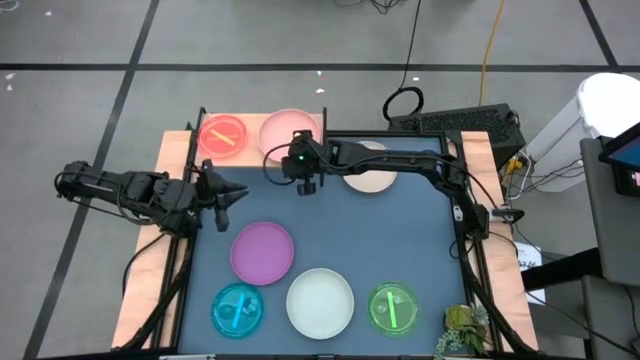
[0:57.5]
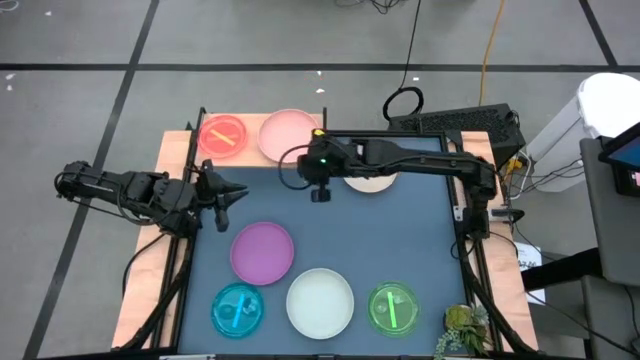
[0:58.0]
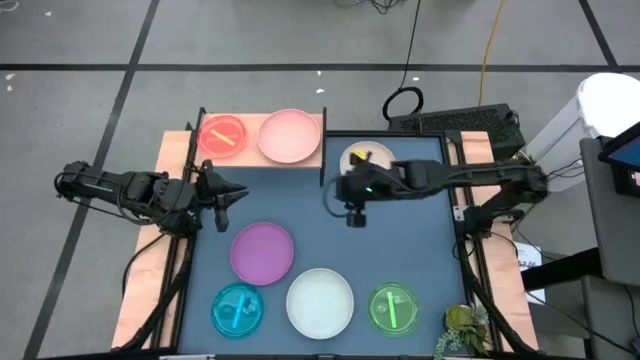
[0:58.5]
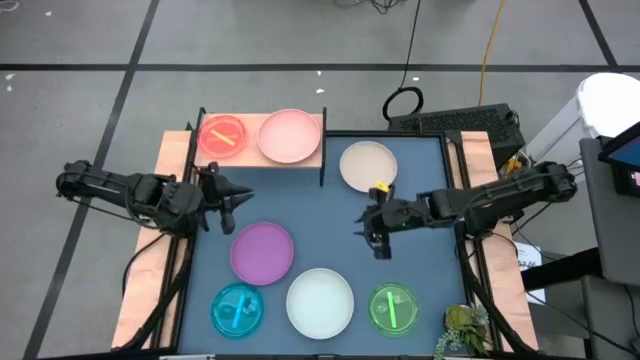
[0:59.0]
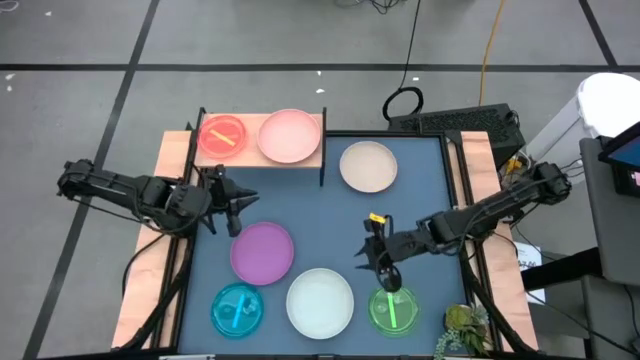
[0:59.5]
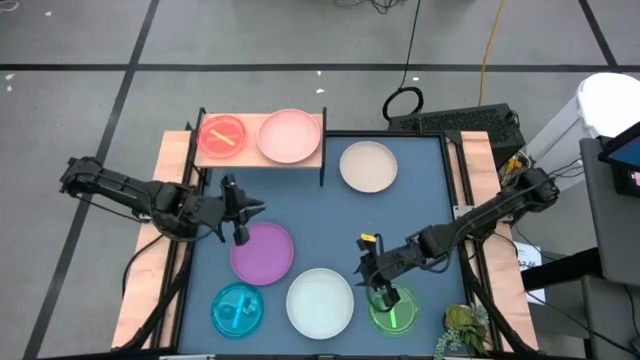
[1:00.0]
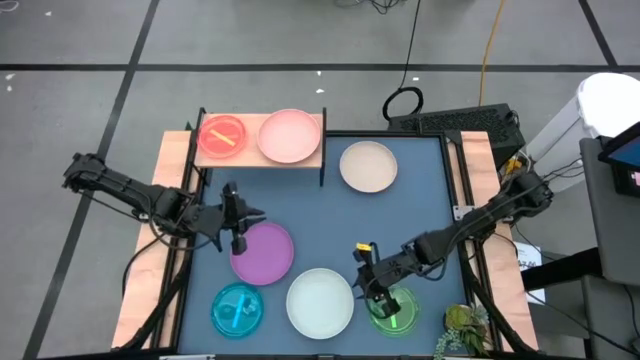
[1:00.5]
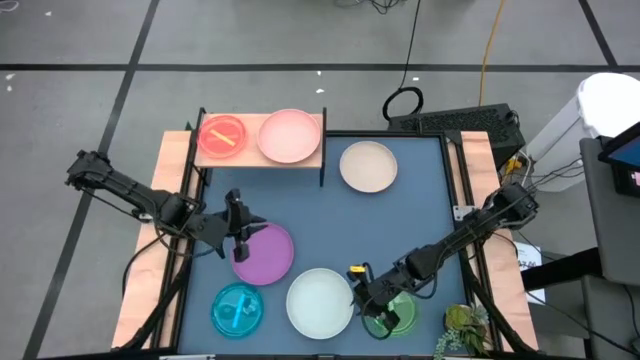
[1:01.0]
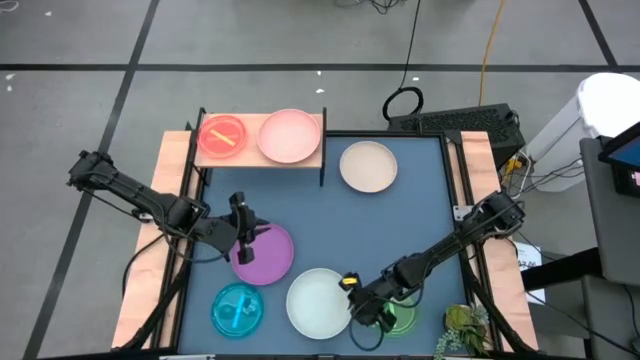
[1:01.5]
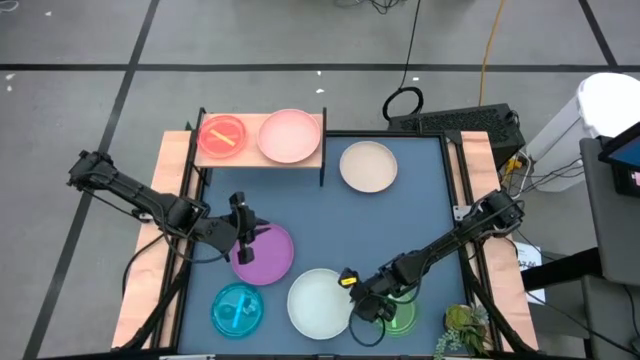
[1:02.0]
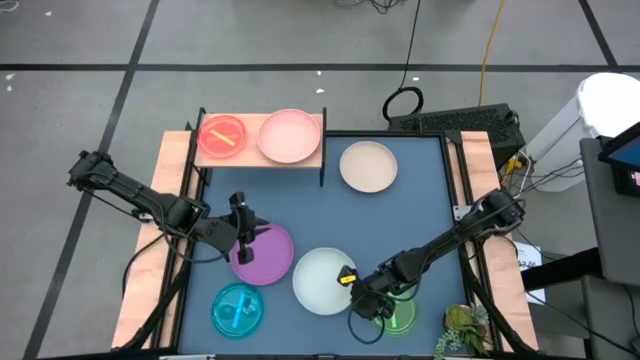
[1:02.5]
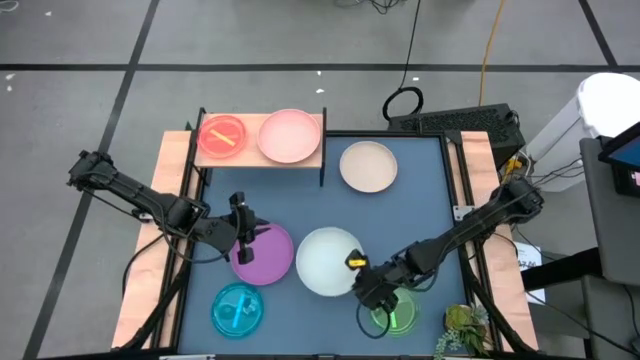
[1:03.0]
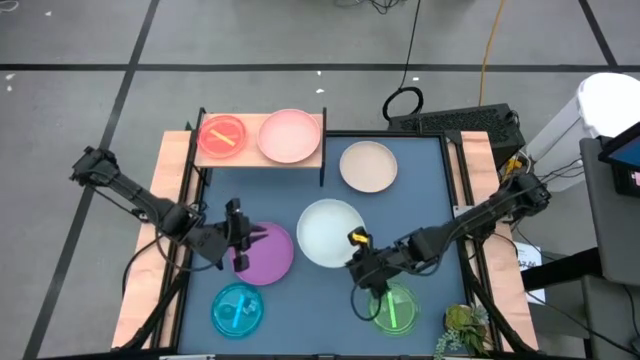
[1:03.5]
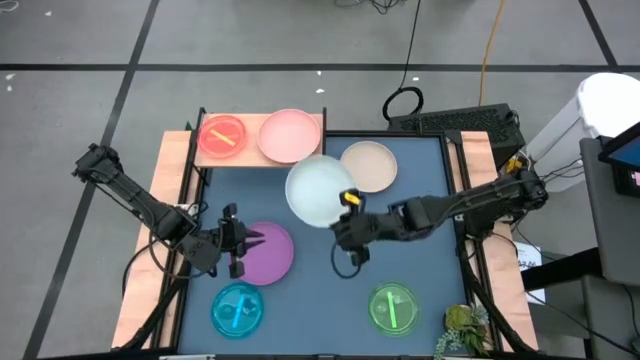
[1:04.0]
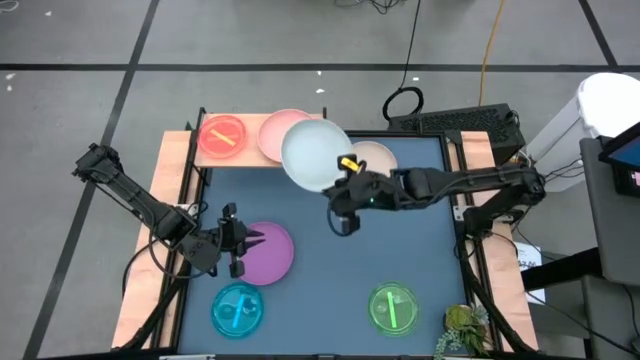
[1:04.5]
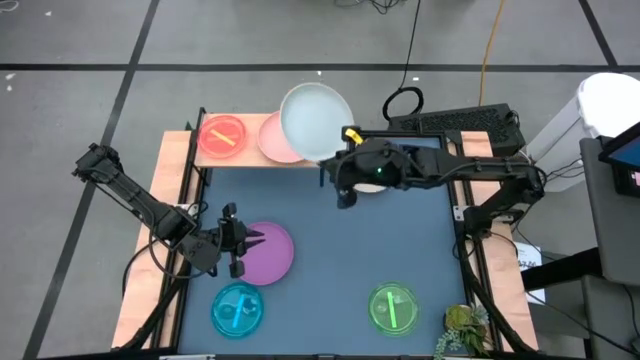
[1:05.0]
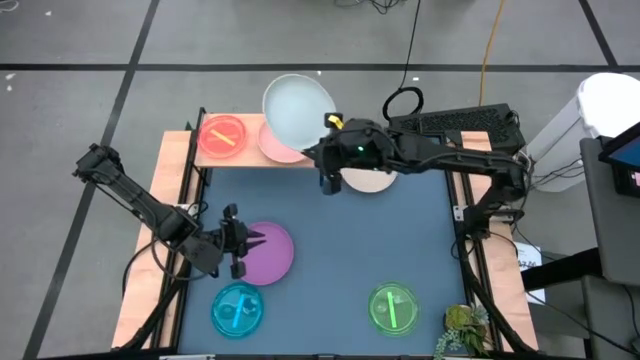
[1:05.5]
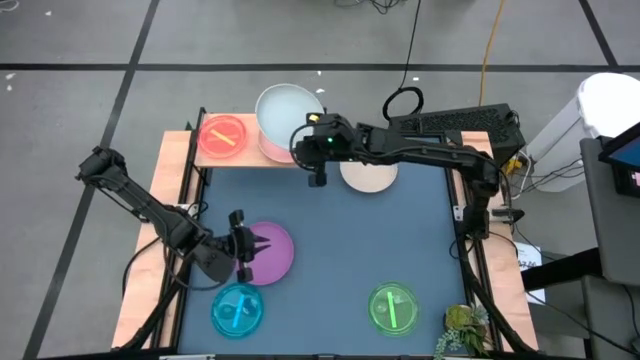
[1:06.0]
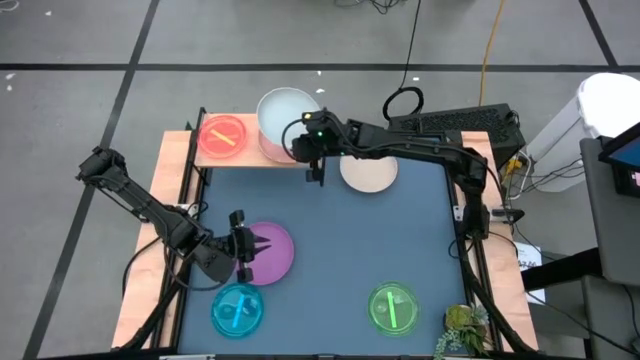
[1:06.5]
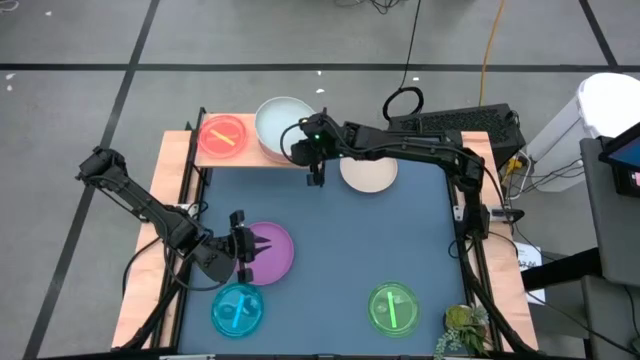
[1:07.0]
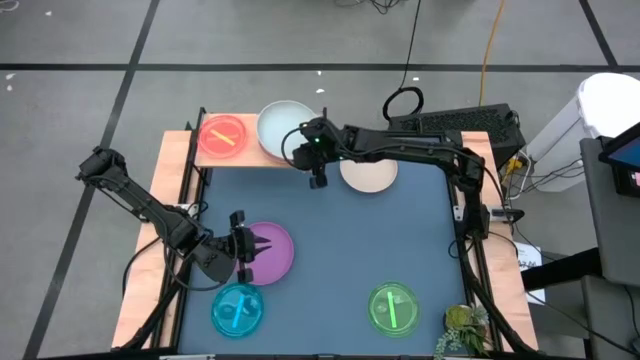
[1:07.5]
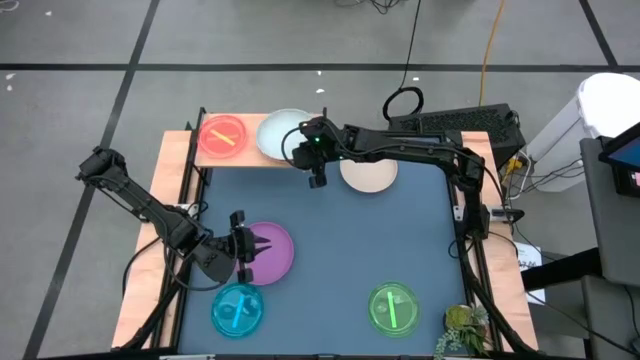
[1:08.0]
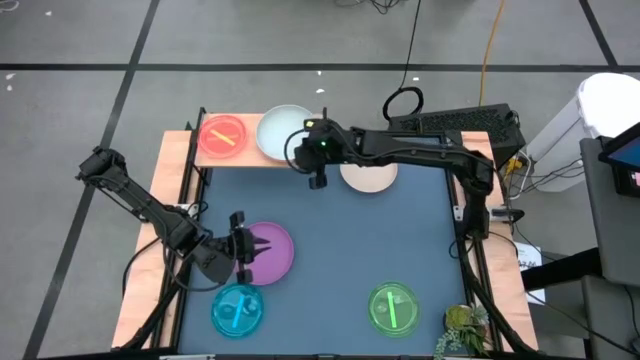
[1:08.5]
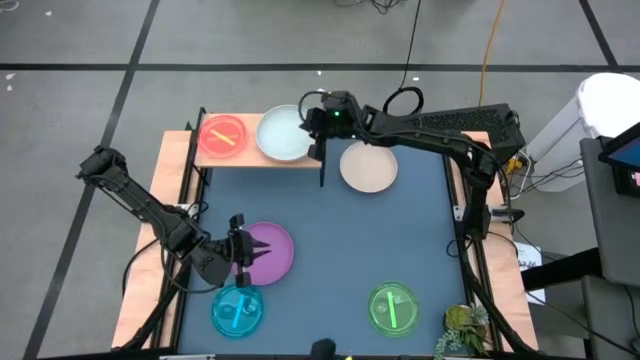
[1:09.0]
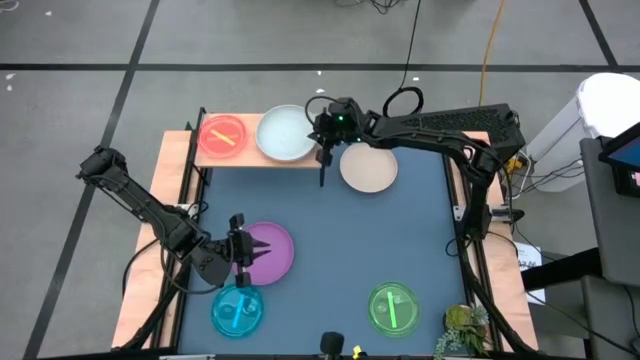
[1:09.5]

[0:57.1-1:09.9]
Task: Place and stack plates onto a shelf
Stack the gray plate on top of the pink plate on the shelf

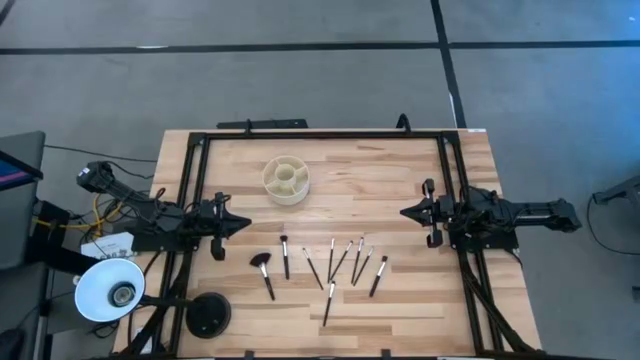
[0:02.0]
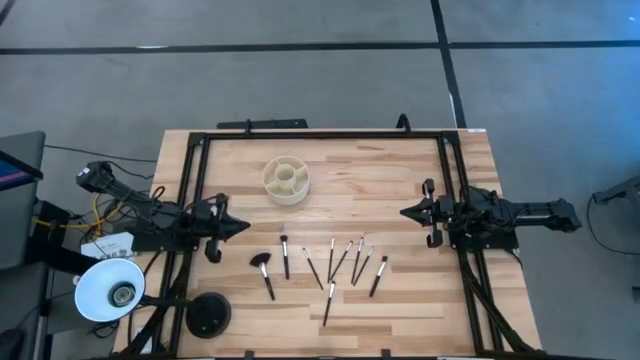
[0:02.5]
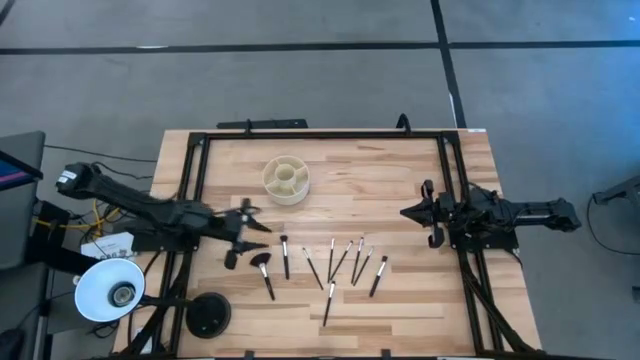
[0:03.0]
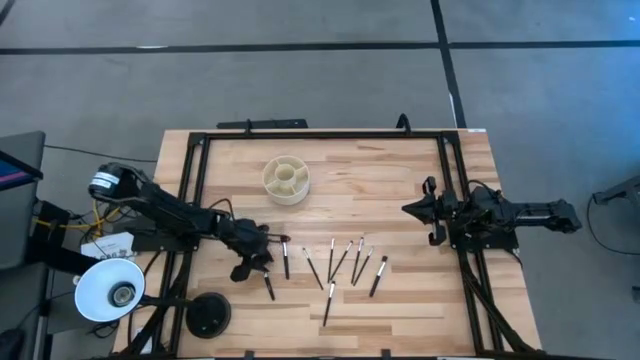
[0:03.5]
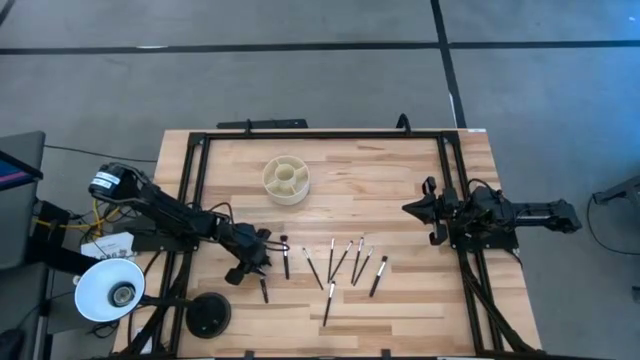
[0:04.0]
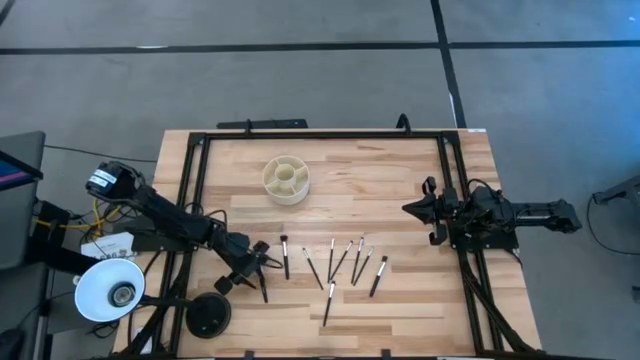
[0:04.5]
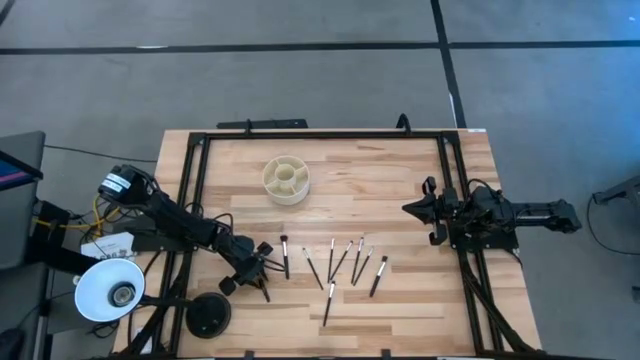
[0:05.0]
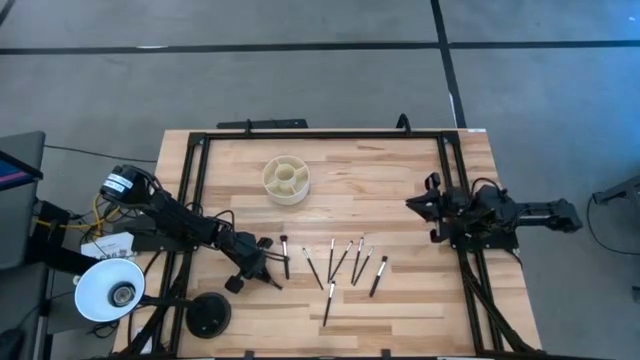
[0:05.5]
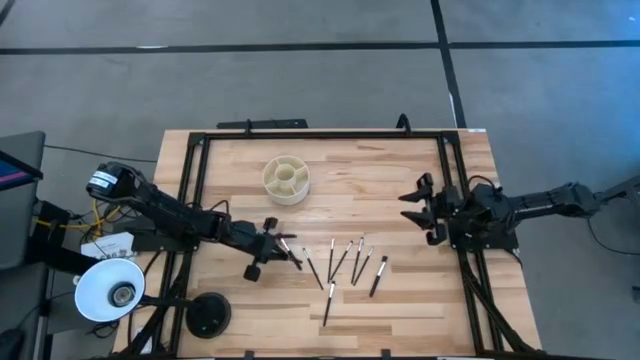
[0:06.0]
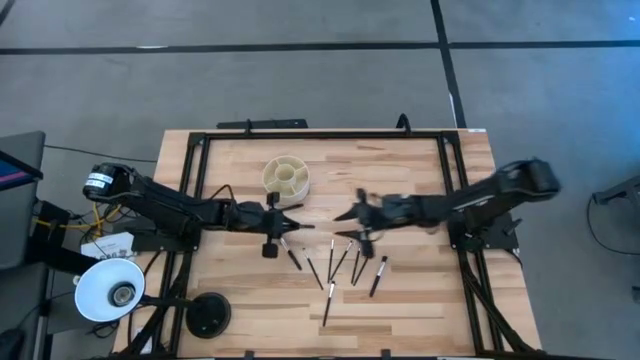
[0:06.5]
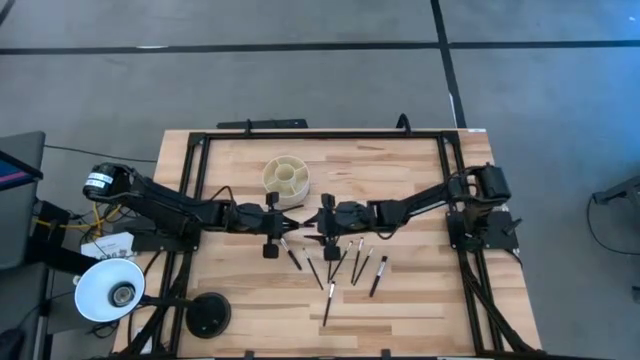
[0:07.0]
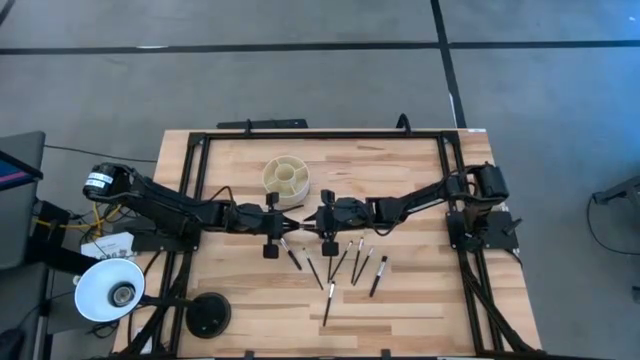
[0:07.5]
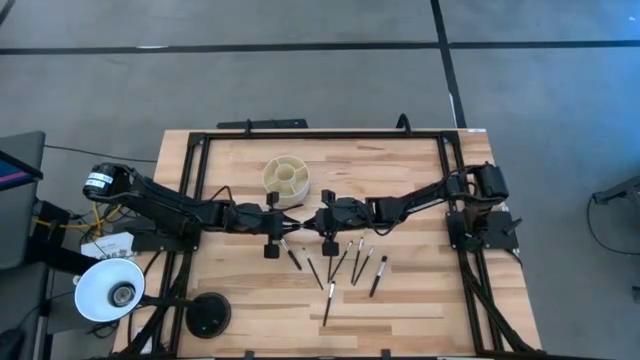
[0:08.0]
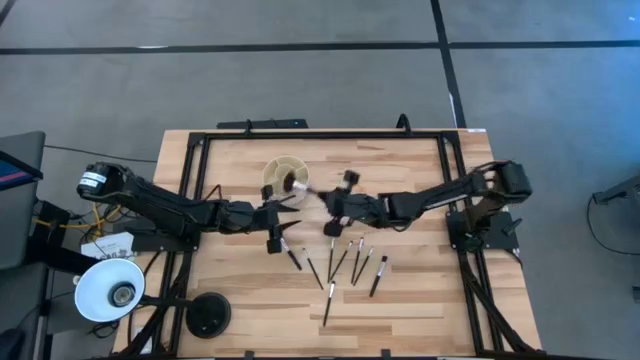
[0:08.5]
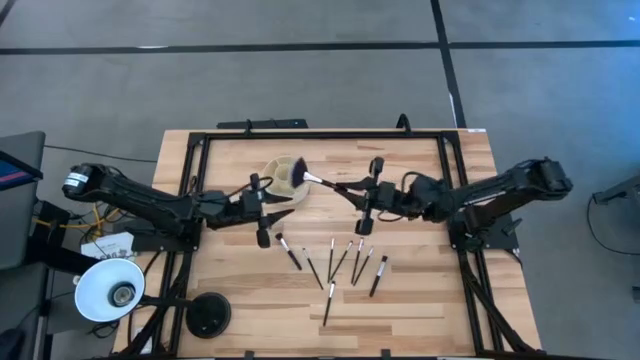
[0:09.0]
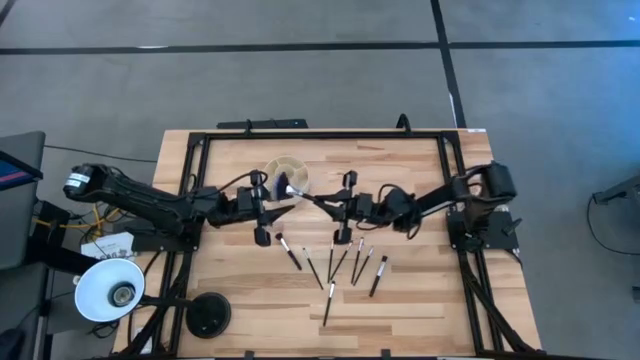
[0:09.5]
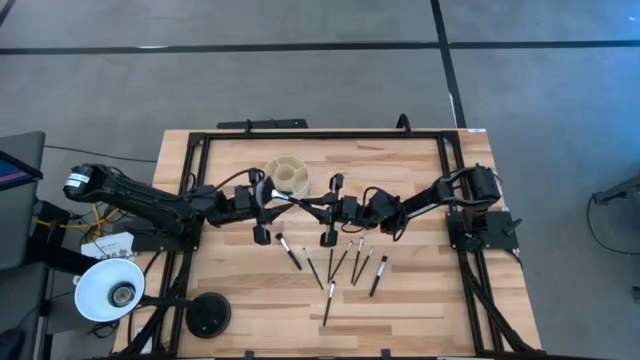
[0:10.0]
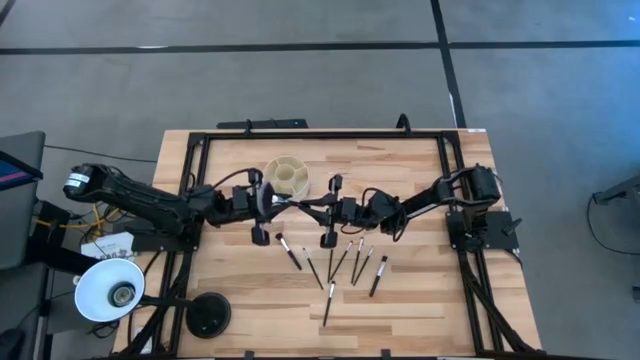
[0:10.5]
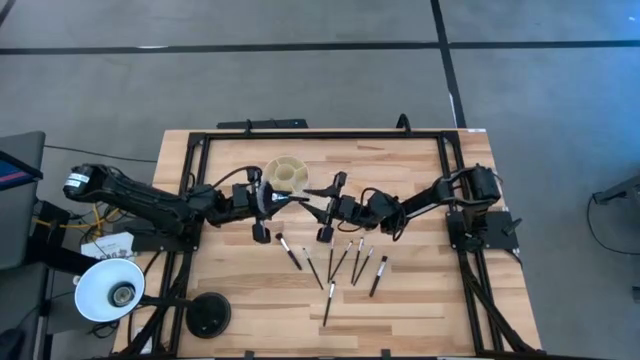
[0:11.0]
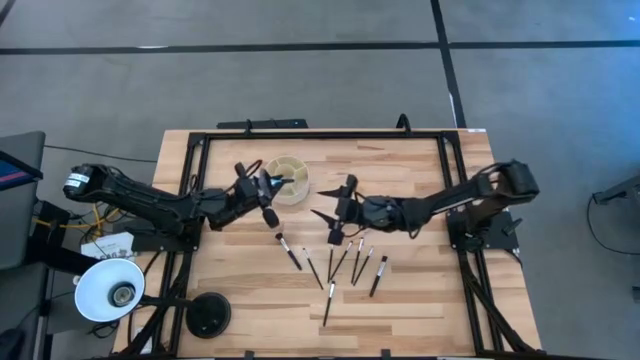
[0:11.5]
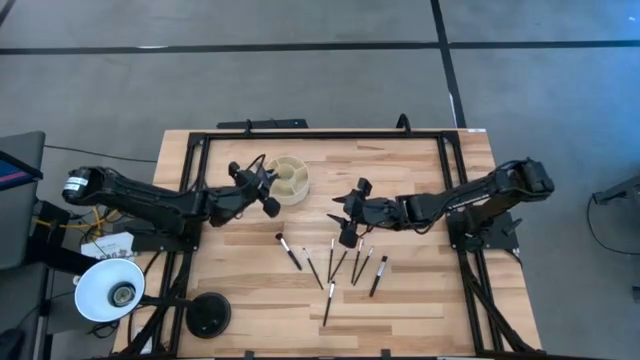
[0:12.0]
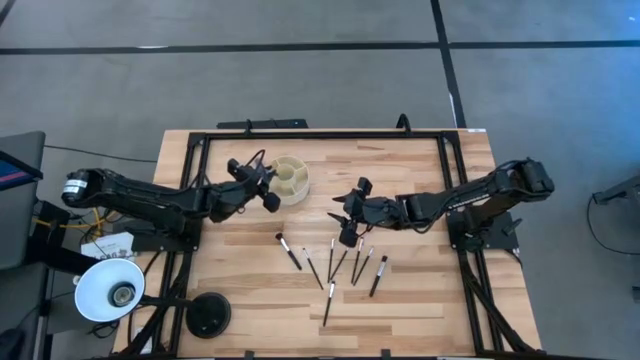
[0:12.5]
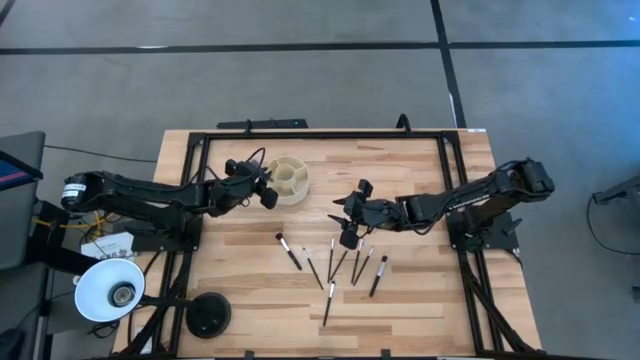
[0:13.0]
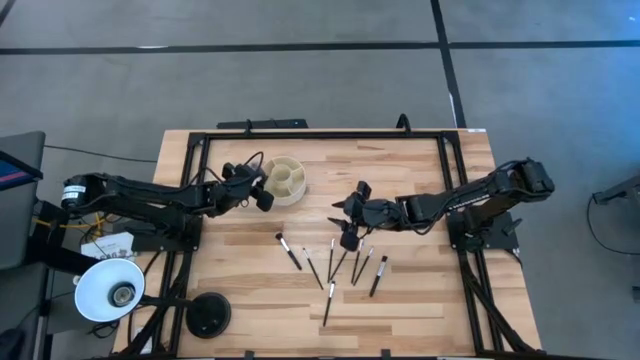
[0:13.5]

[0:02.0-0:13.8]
Task: Sort items
Put the black highlighter brush in the white organizer
